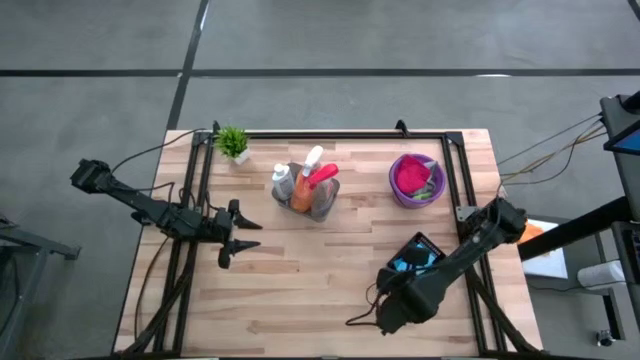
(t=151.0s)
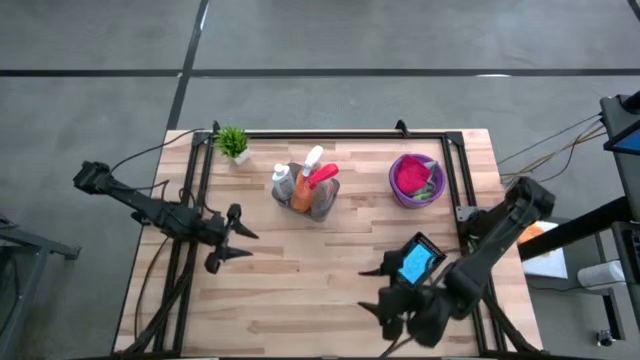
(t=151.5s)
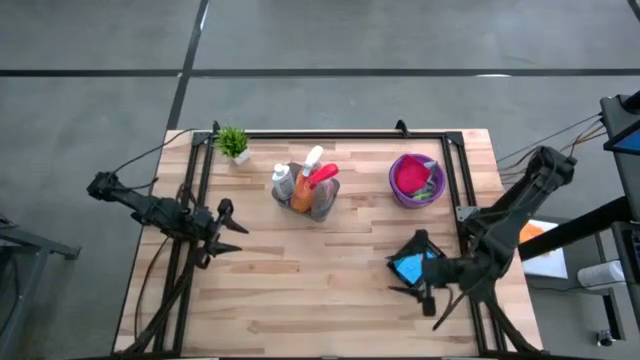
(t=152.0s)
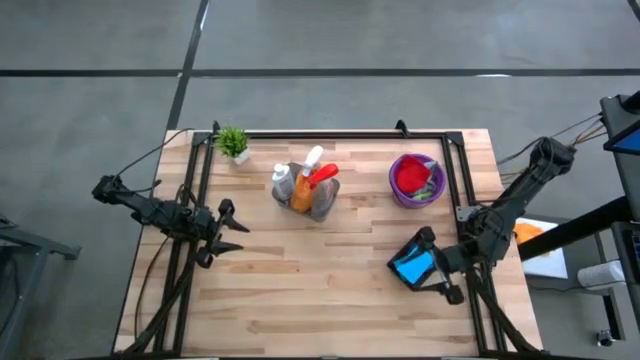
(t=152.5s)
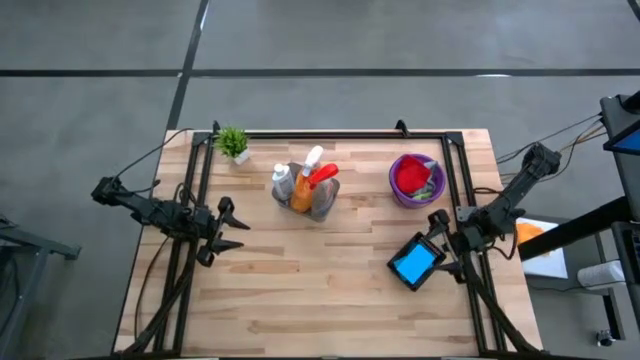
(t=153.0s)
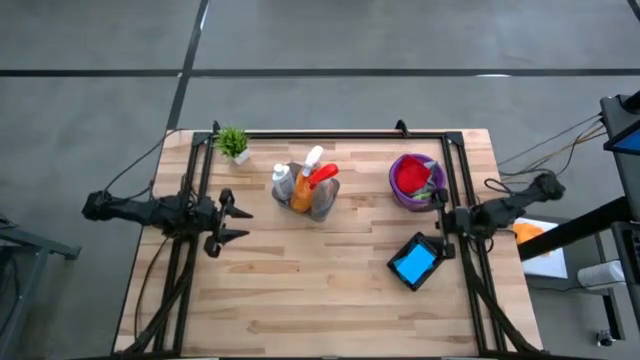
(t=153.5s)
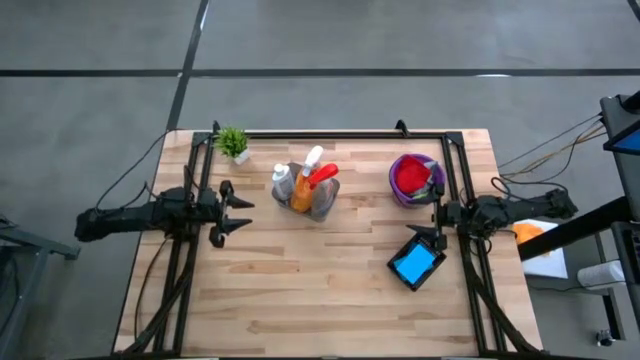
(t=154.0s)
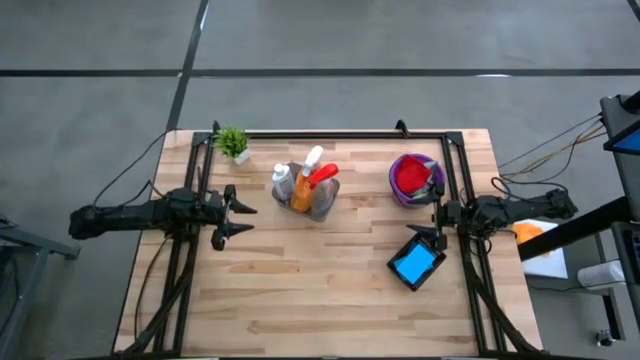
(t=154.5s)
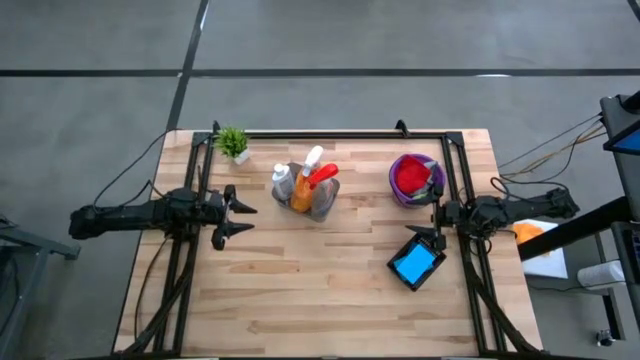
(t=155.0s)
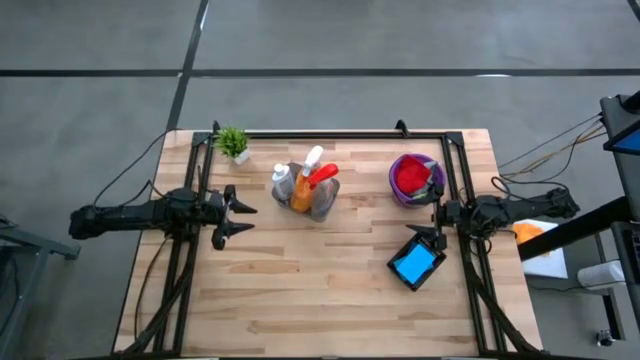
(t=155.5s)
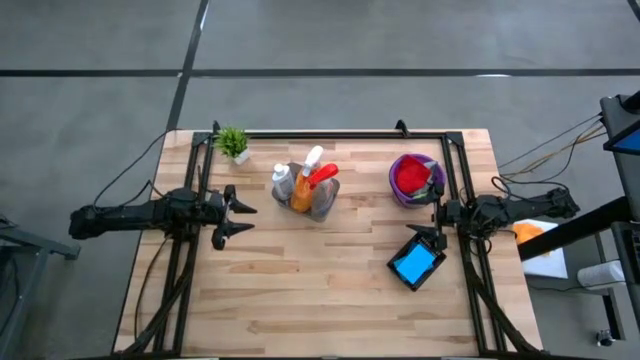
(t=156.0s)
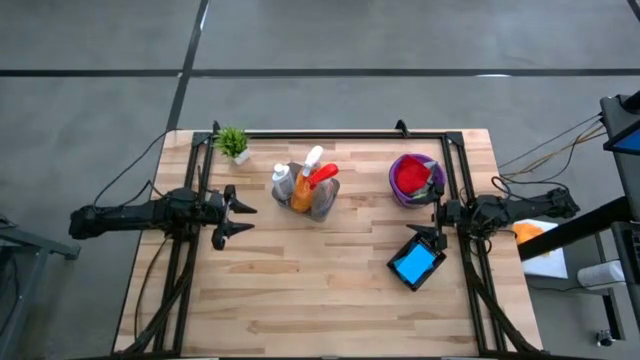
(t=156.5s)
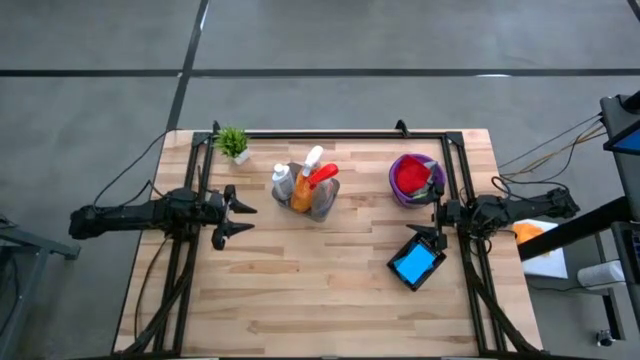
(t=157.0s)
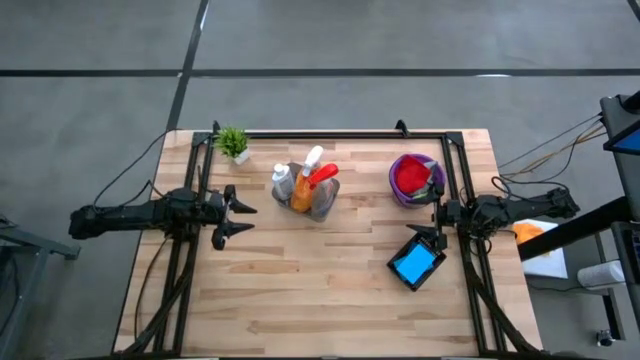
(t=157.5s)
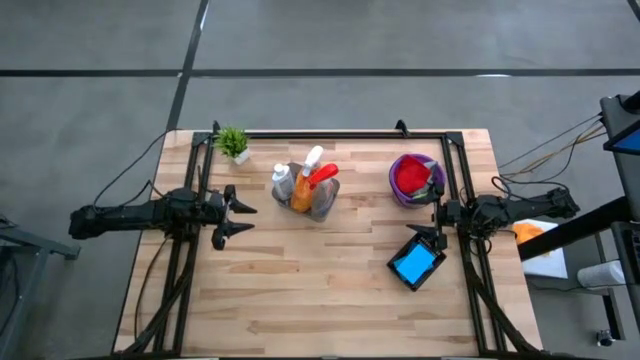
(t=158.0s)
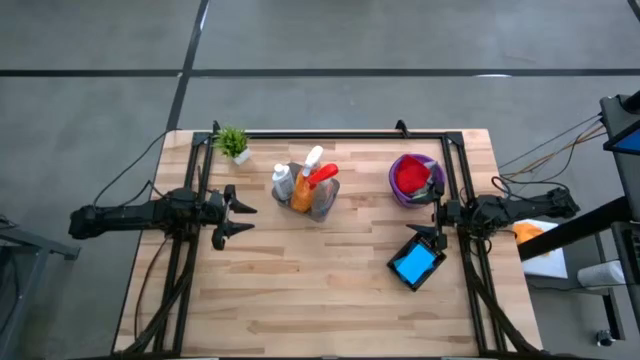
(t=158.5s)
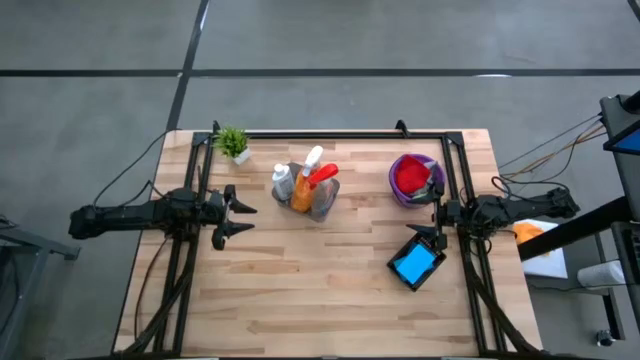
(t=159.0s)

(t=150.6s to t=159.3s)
Task: Pick & Place Kitchen Items
Return to Home Position

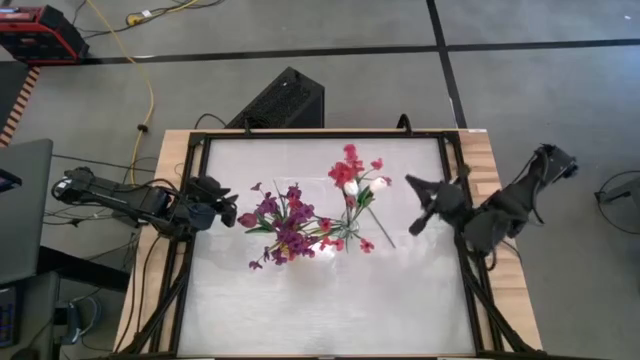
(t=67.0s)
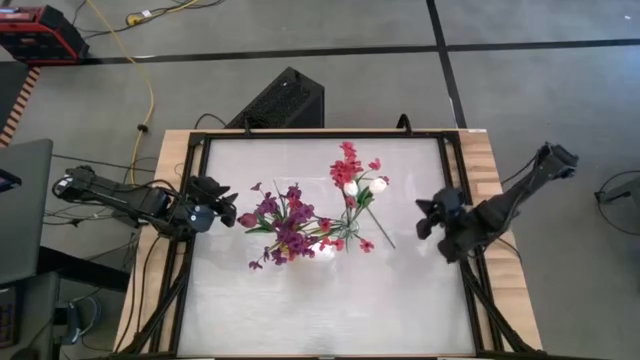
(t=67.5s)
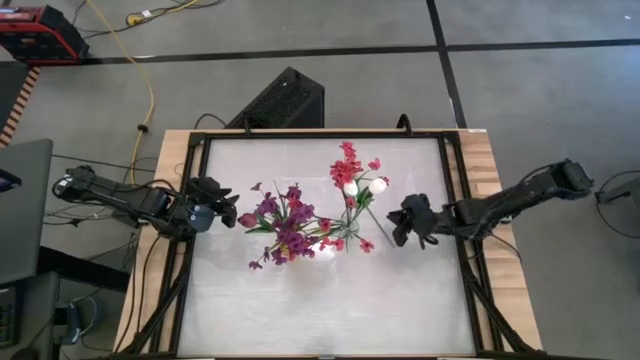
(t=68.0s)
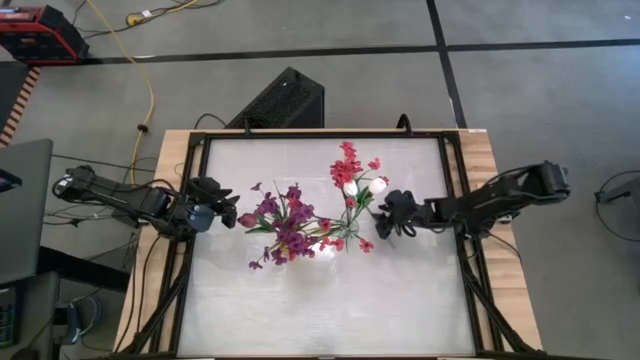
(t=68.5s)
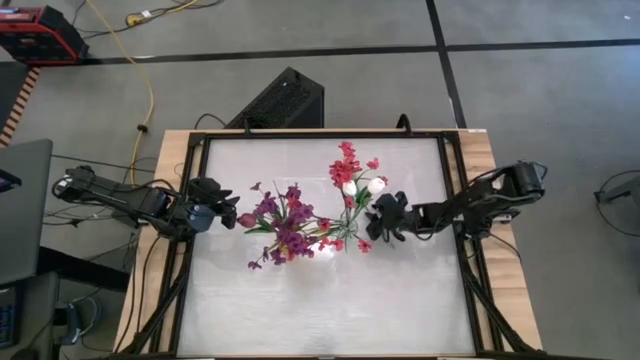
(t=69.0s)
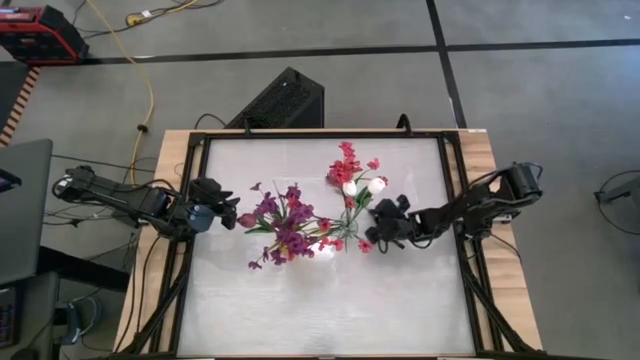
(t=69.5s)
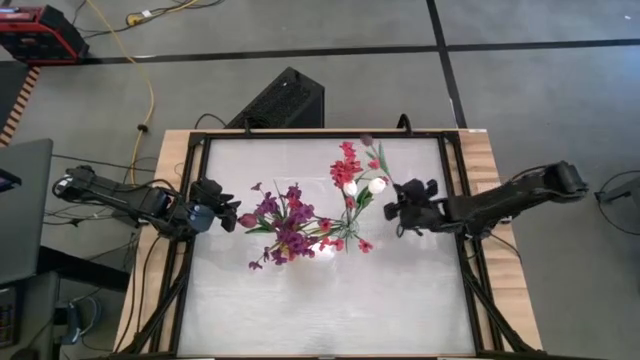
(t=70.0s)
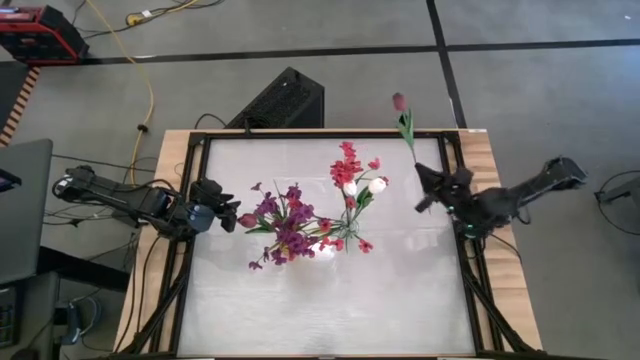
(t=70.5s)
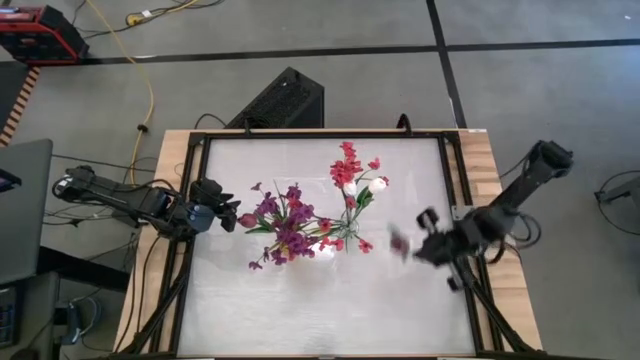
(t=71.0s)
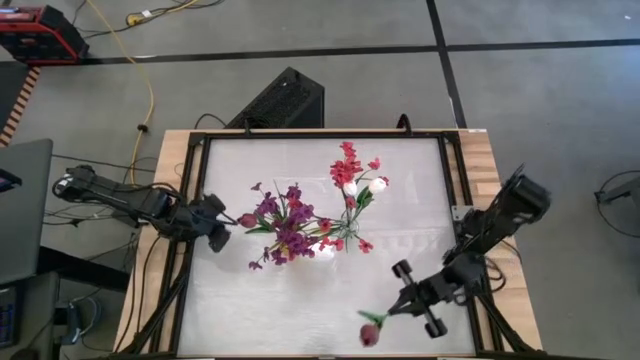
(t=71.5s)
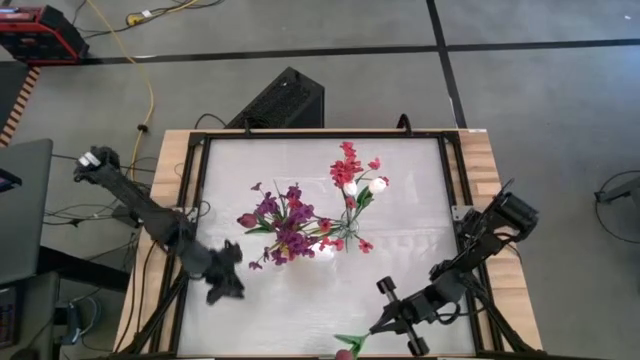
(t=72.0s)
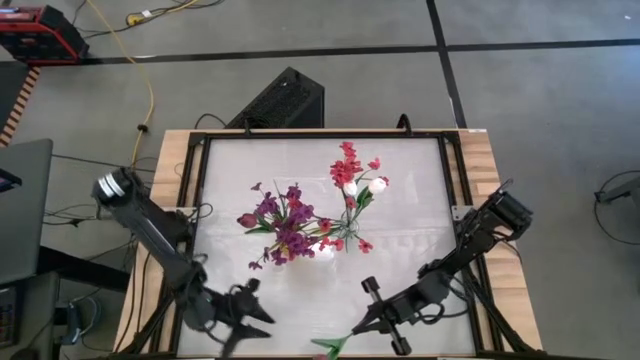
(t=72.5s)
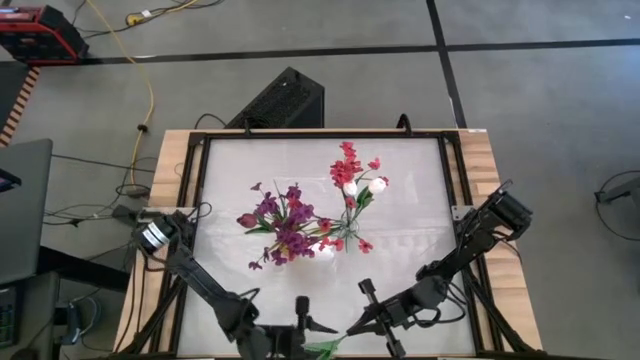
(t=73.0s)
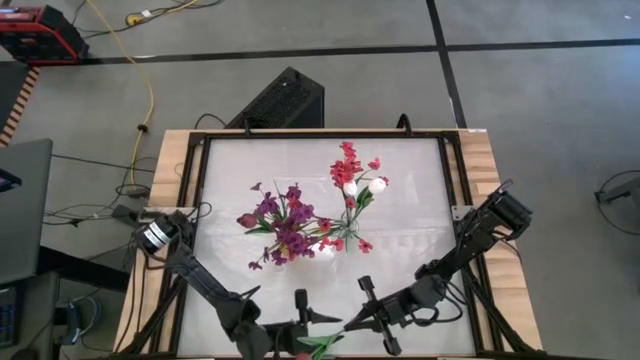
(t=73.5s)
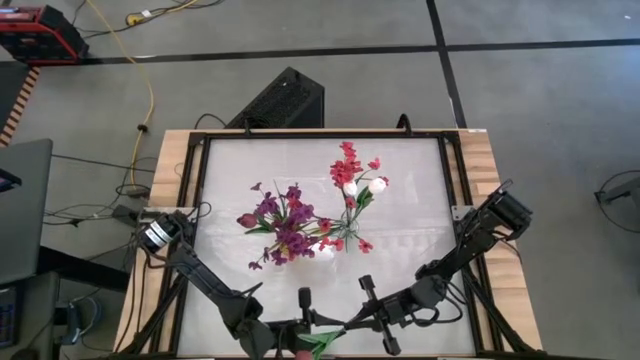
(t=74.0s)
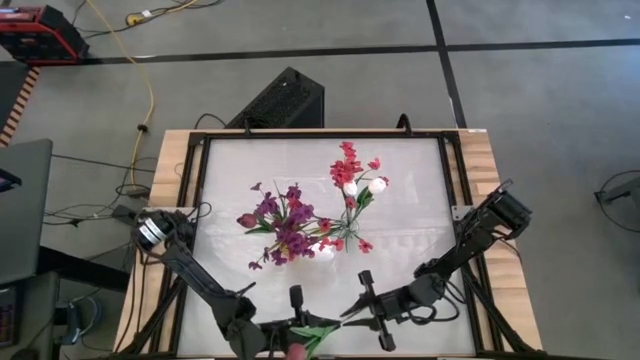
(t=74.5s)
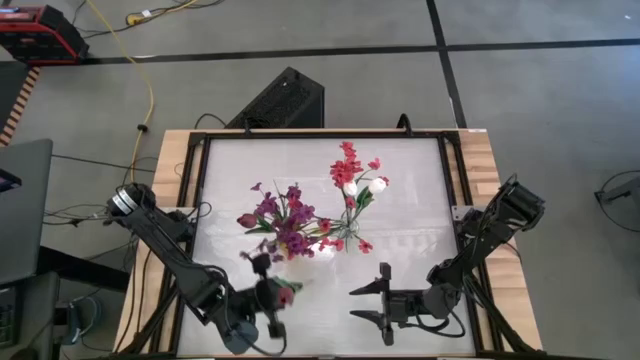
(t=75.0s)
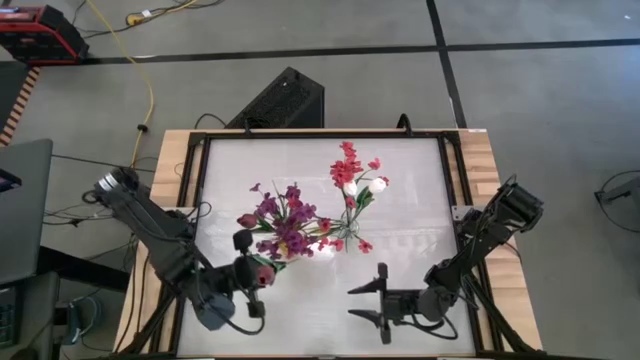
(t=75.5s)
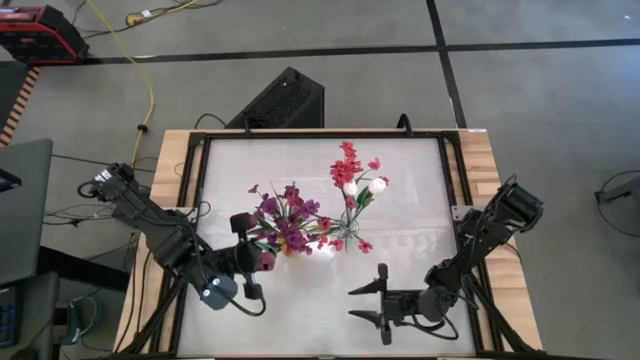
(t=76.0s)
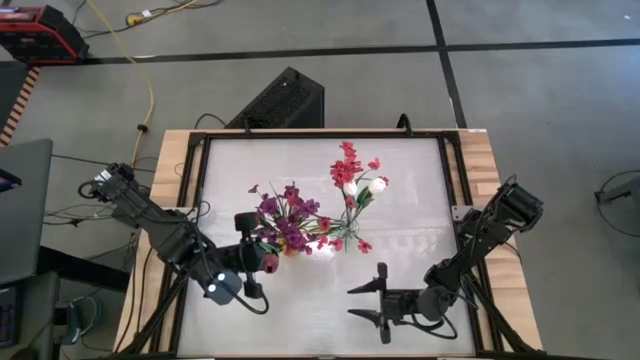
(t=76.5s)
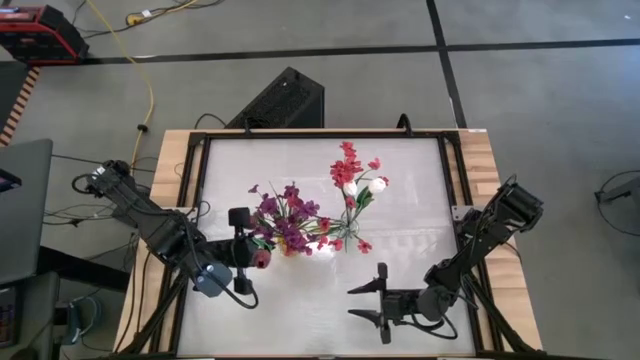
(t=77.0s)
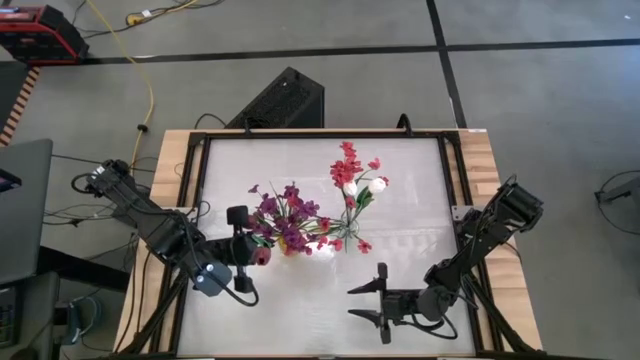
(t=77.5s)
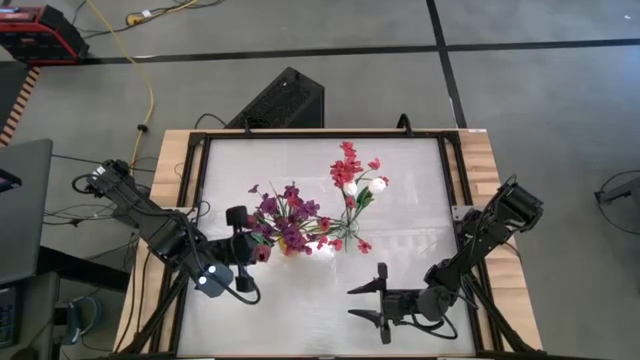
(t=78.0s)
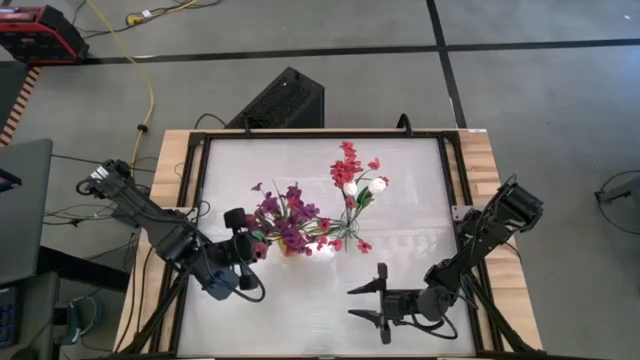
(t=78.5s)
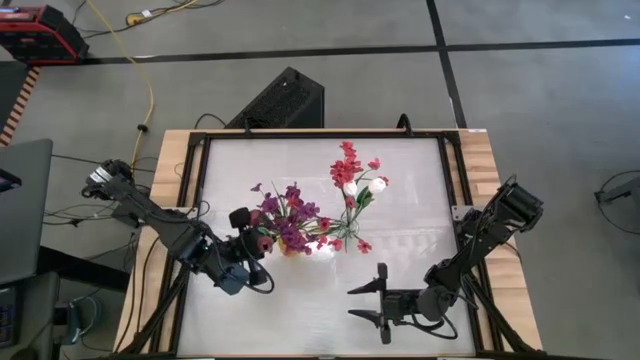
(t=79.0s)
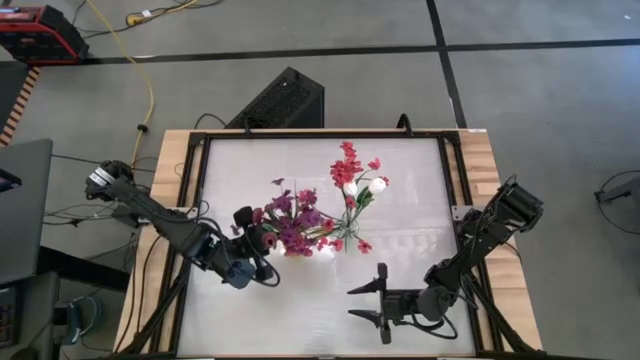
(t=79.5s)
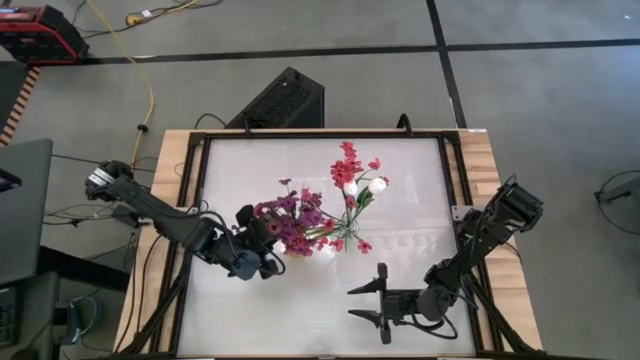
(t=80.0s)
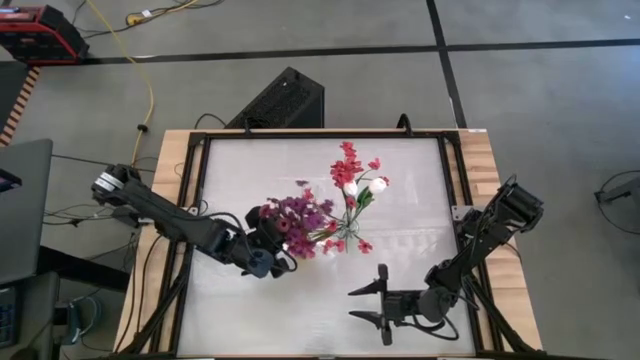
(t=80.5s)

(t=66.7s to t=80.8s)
Task: Sort flowers into vase by color
Put the violet tulip into the yellow vase
